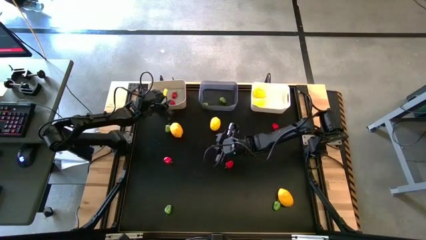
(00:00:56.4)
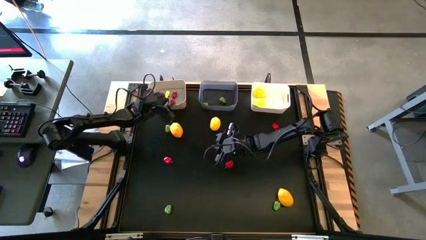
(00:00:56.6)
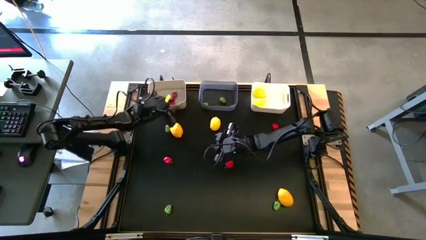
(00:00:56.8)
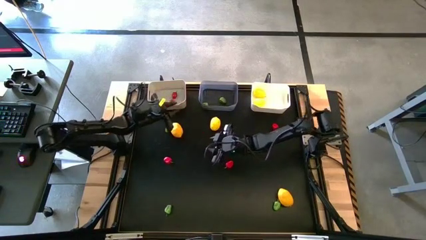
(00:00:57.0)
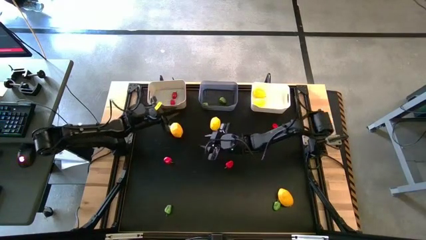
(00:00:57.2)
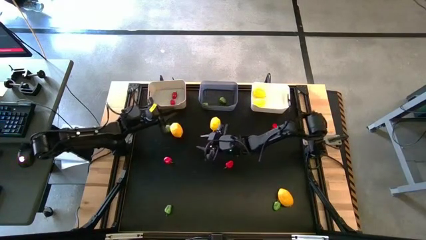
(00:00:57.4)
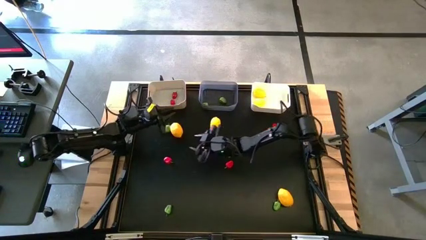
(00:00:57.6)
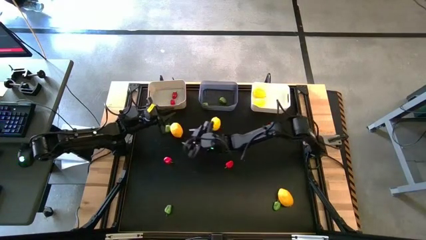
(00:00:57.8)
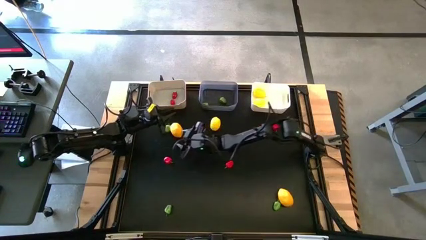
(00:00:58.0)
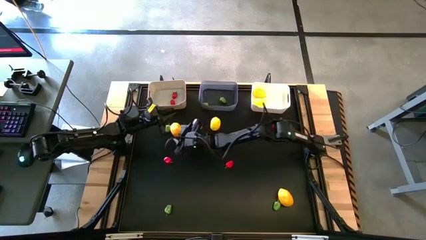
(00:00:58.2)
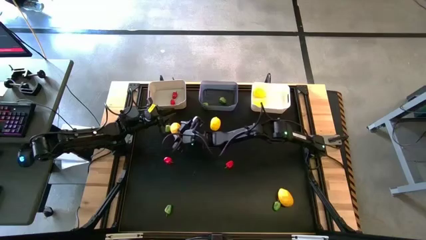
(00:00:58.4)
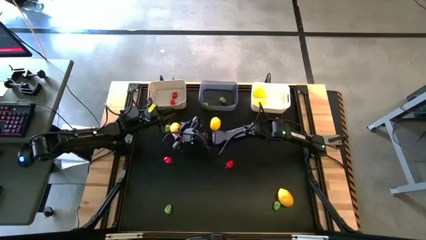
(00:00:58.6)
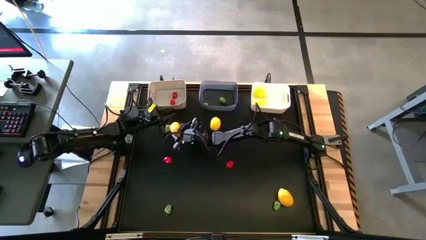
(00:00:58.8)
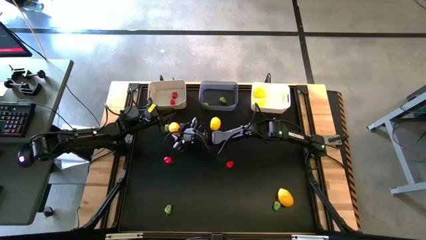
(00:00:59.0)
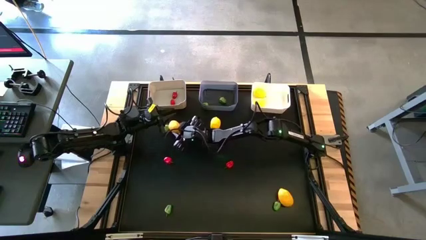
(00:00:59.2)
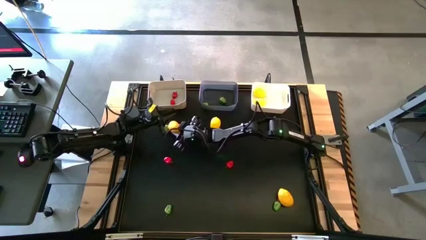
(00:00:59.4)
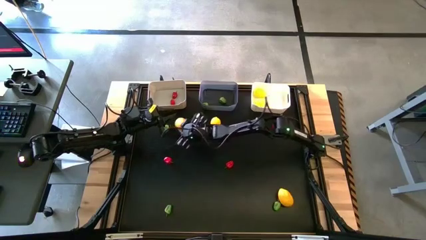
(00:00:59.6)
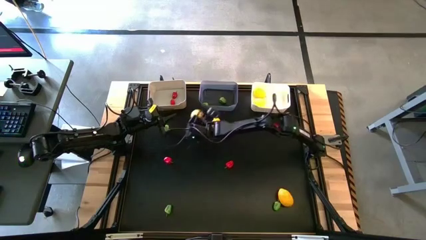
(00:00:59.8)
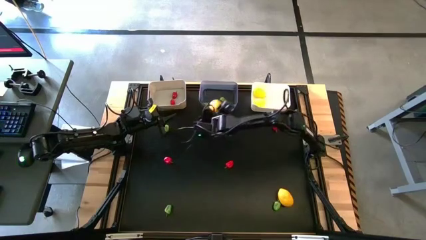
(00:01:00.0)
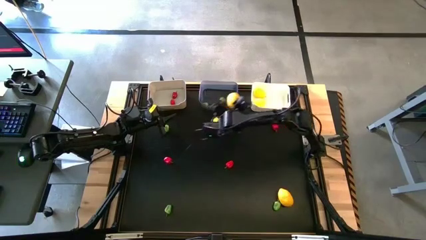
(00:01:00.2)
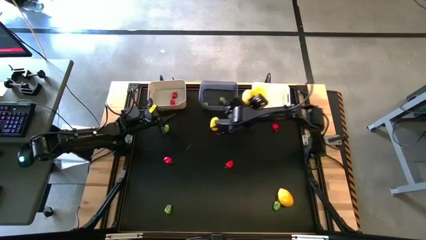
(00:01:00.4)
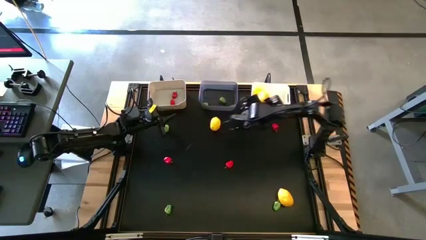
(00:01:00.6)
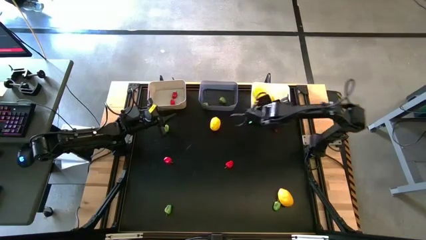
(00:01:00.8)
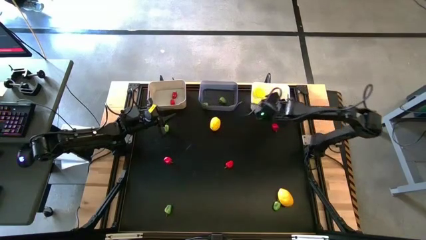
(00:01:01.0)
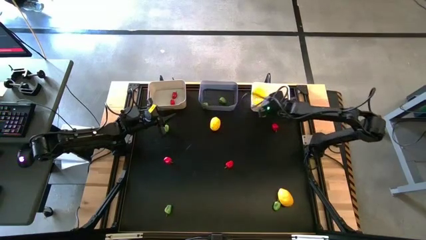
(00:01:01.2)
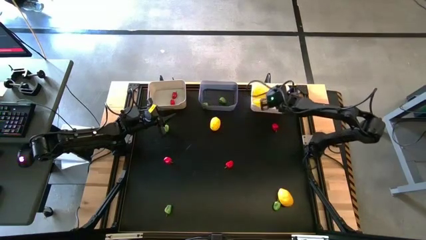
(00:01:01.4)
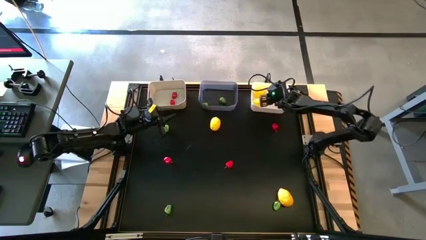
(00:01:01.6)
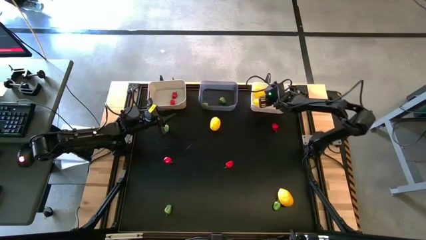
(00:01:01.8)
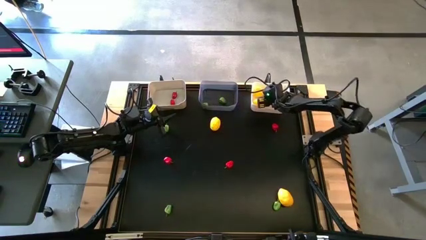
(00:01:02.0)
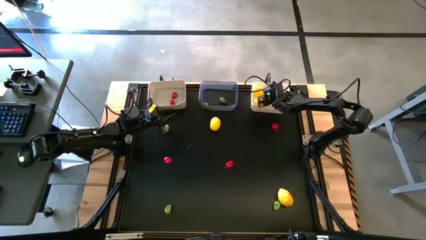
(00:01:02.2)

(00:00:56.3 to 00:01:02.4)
Task: Sort produce into baskets
Put the lemon into the white bin

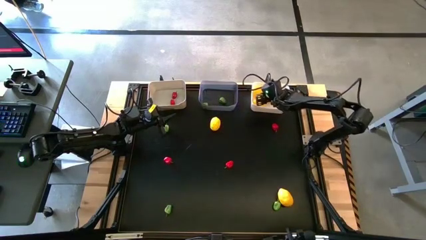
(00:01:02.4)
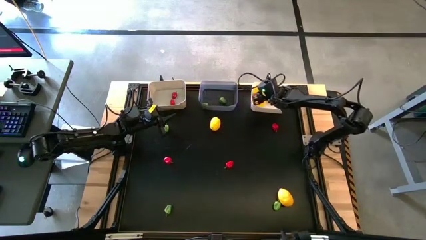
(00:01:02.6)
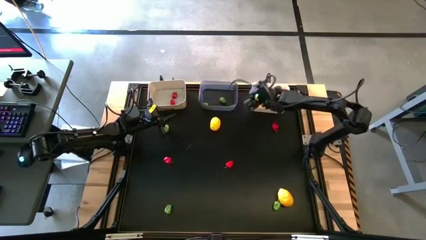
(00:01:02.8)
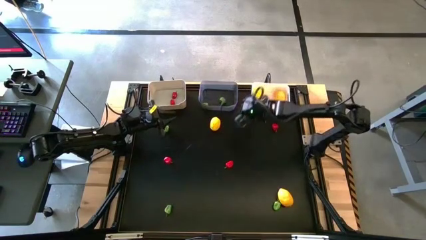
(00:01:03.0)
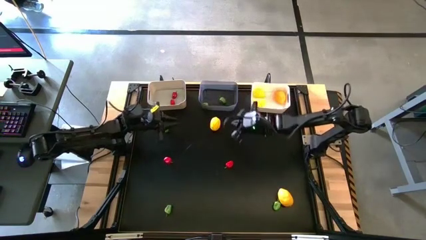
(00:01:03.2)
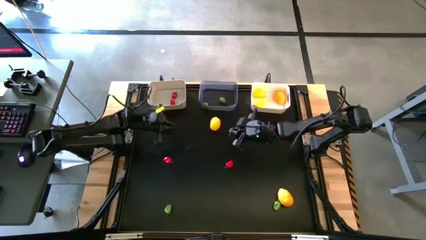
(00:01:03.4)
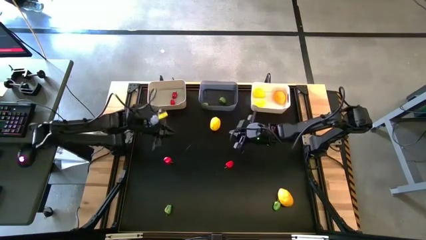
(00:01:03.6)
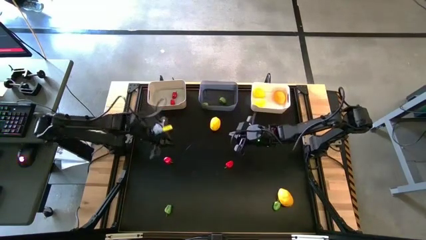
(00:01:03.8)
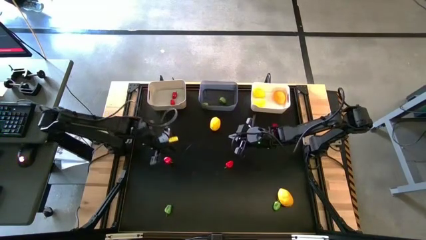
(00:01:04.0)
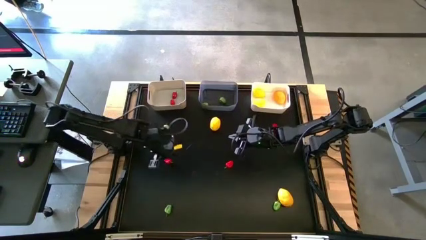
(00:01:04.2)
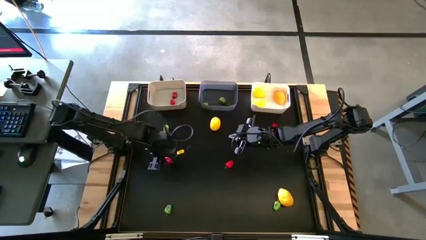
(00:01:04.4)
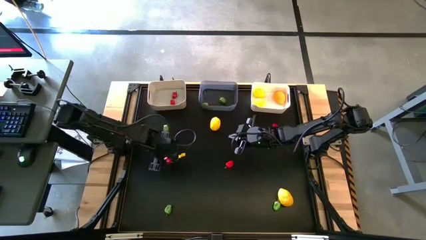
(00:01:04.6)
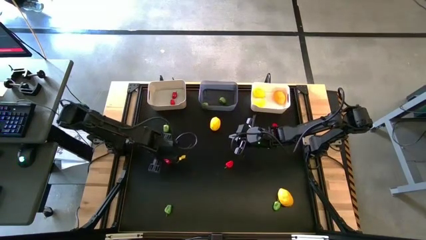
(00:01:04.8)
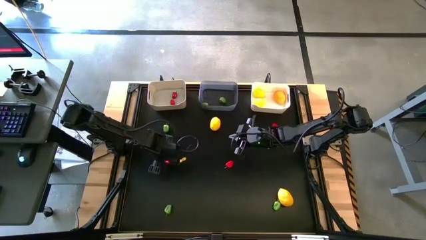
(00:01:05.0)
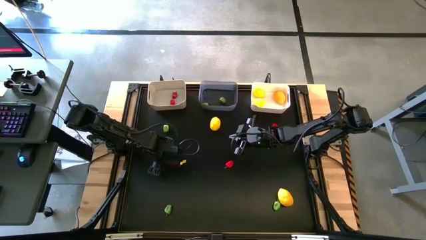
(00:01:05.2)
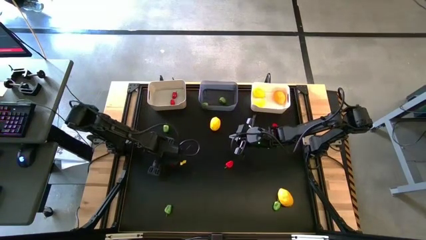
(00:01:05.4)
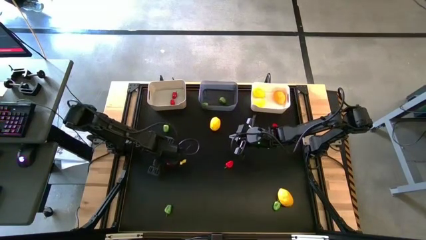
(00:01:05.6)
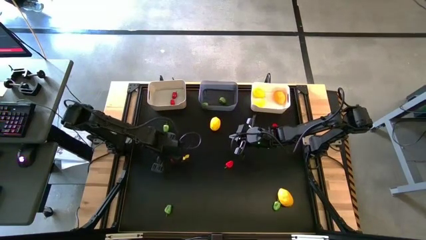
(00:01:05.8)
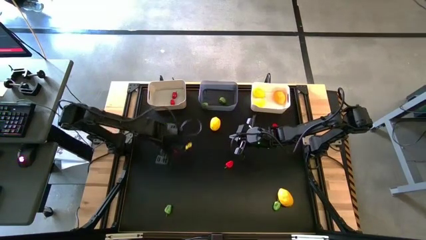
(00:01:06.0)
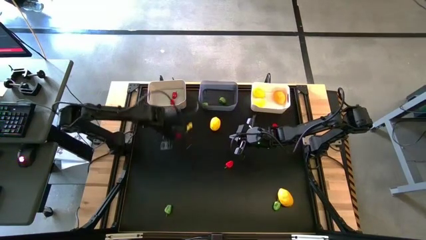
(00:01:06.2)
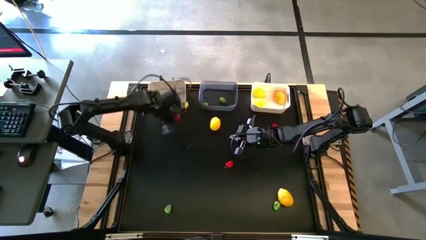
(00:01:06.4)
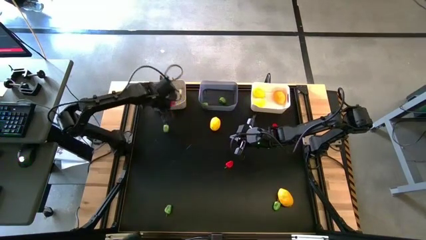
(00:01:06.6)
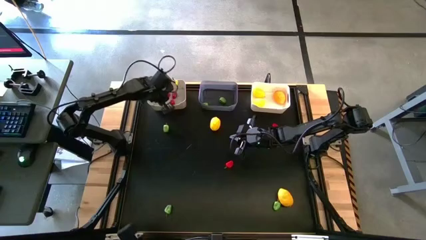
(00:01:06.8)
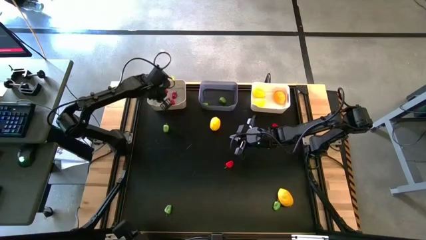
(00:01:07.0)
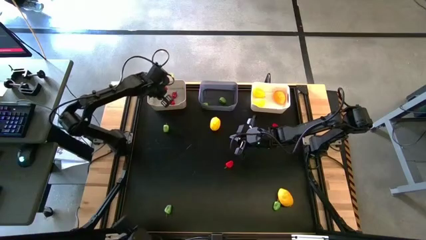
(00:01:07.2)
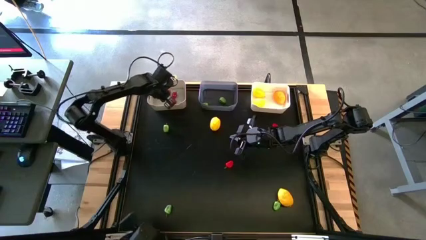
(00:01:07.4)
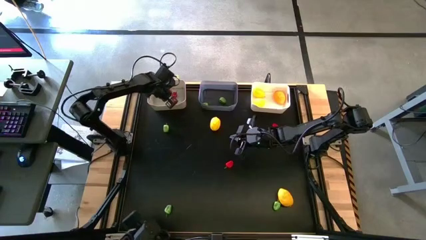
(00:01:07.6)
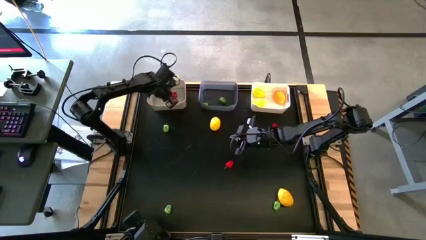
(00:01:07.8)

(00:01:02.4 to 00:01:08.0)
Put the red bell pepper into the gray bin

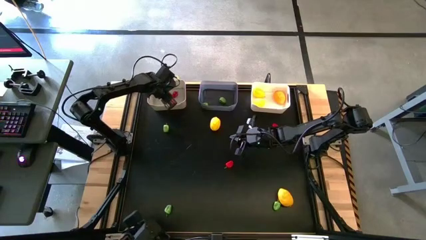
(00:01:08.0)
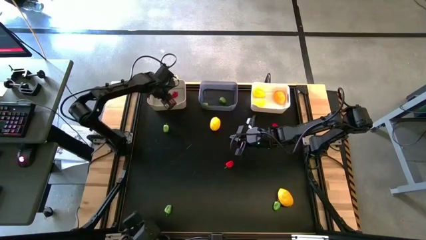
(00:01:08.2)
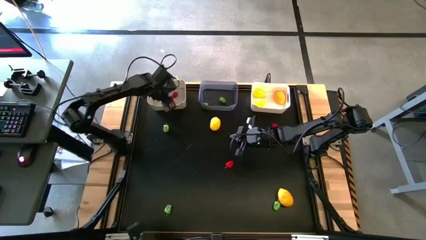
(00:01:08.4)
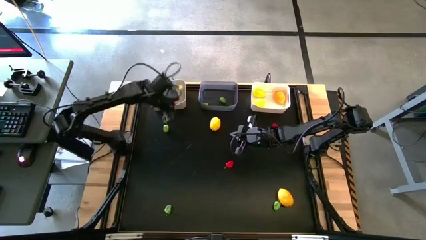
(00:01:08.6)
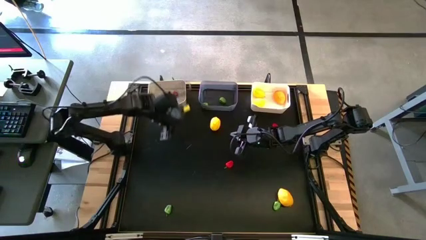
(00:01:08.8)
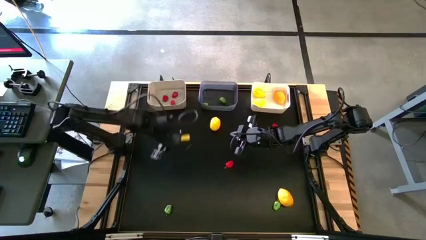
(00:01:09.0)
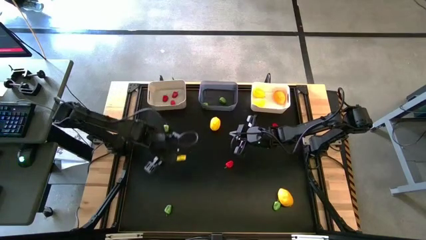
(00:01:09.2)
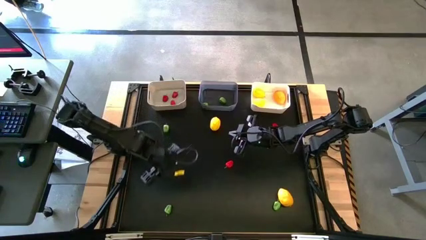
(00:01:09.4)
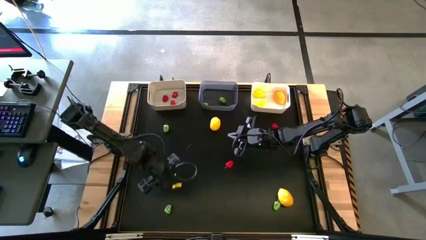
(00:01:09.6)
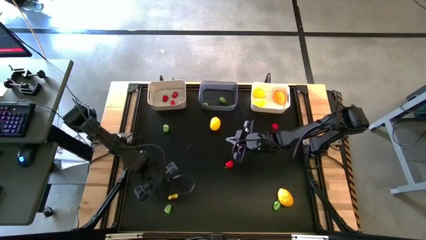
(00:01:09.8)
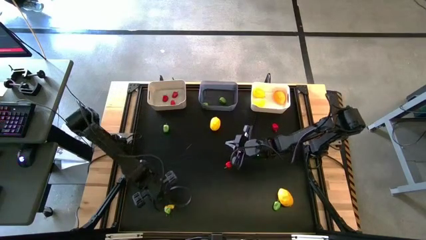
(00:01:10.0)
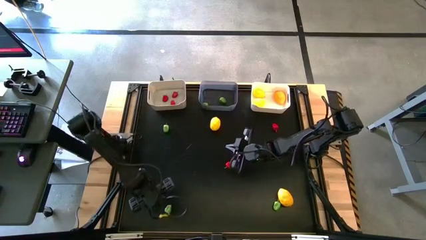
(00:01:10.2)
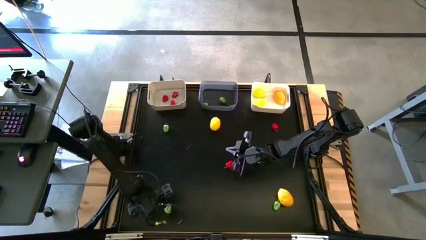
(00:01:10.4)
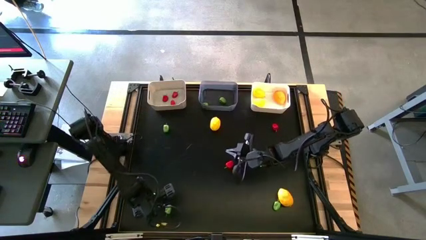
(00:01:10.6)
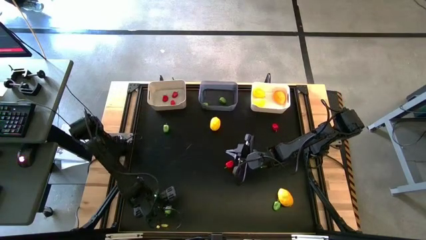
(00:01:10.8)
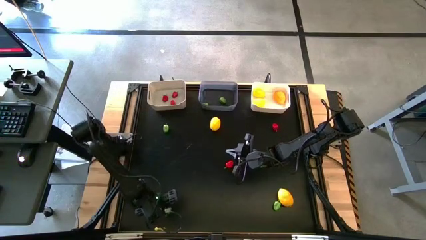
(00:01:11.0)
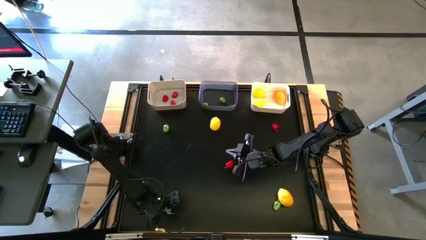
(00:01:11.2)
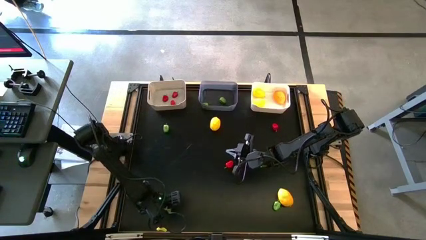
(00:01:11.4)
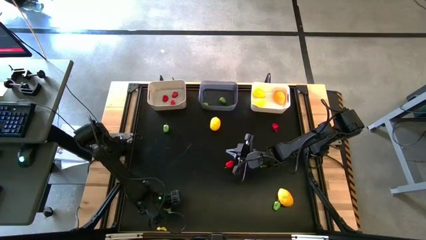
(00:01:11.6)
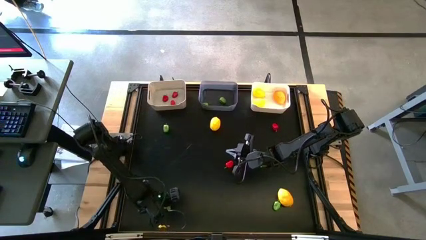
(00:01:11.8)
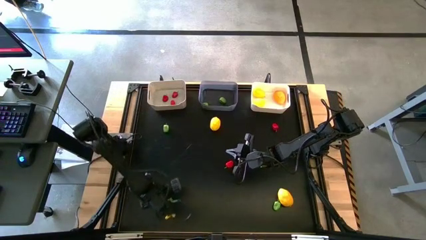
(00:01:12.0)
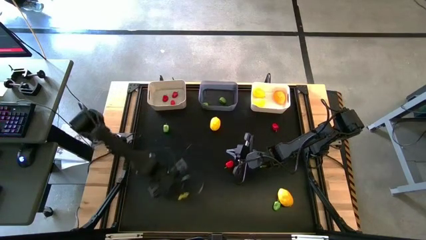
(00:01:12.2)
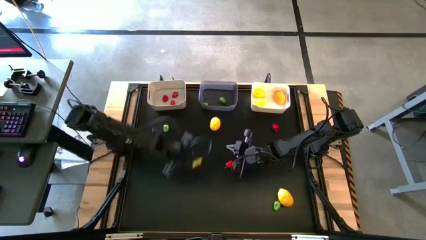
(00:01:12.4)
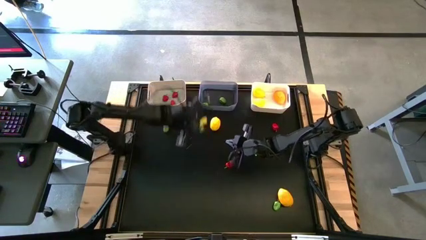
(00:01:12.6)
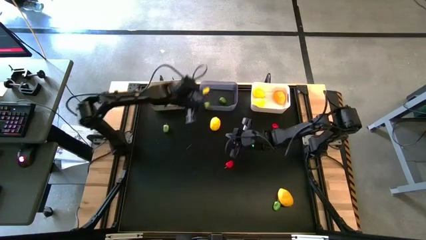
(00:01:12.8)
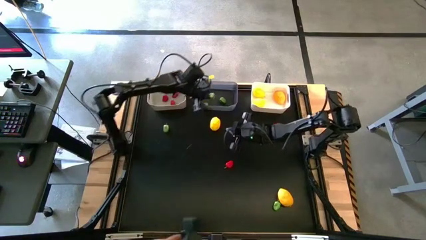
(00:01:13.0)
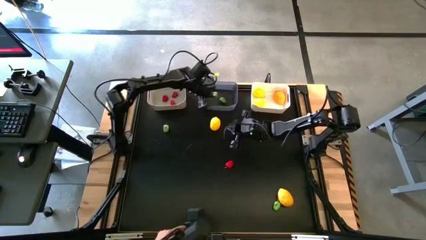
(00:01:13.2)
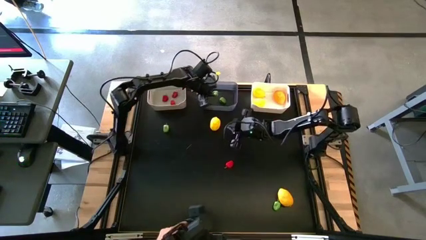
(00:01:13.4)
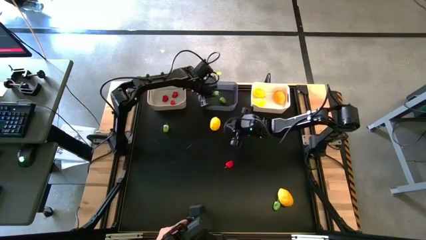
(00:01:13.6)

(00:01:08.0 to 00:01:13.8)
Put the green bell pepper into the transparent bin
